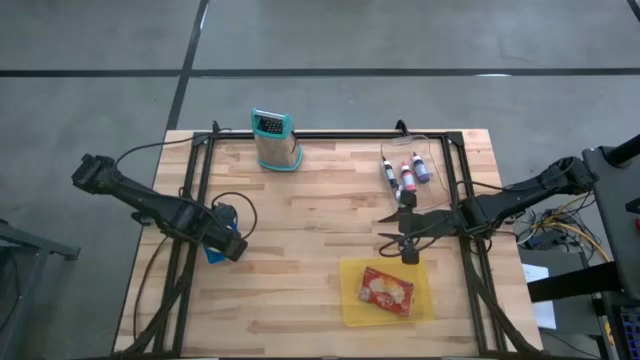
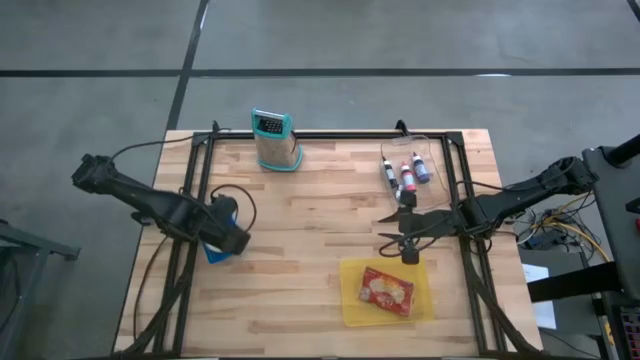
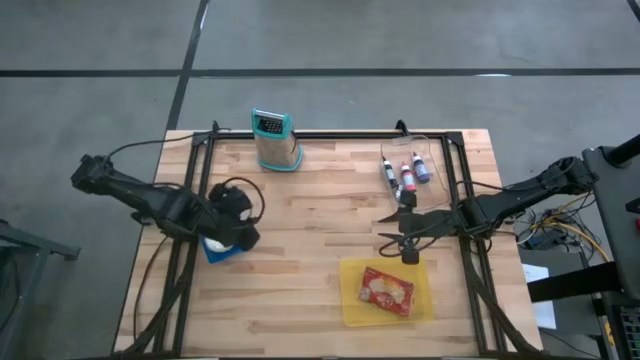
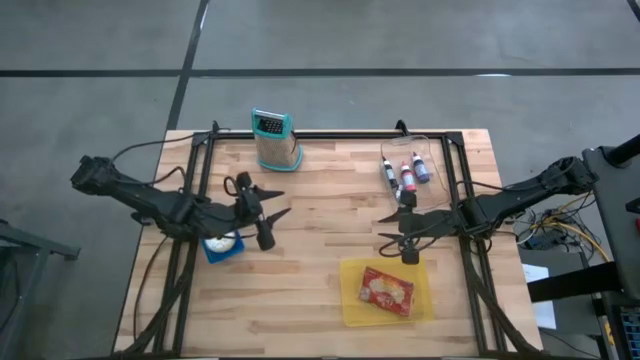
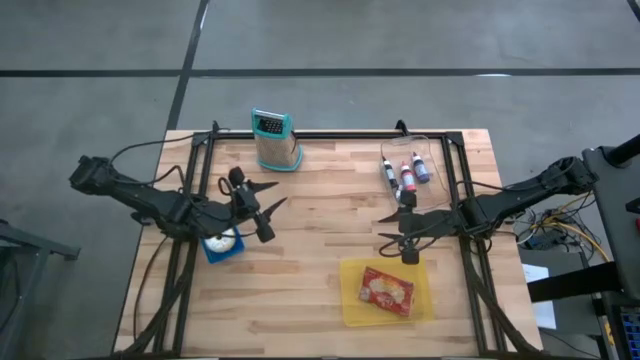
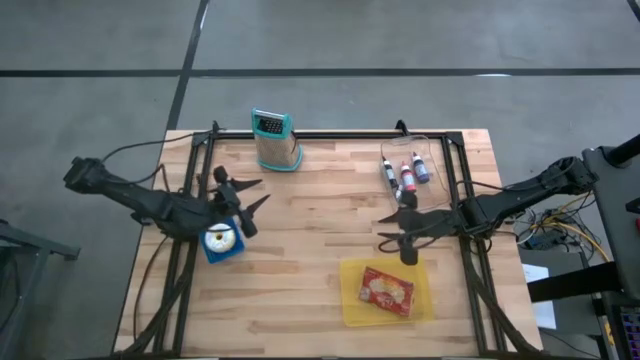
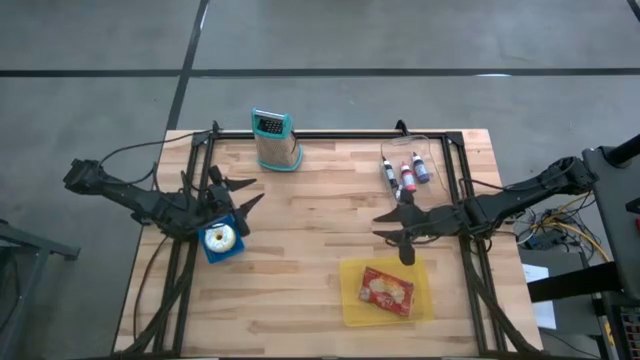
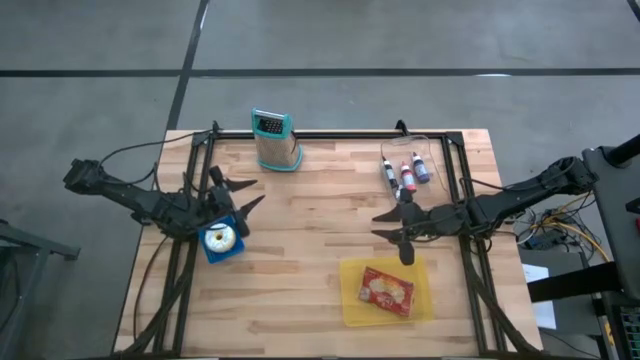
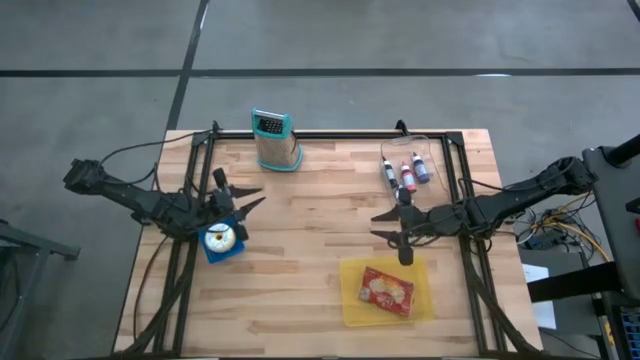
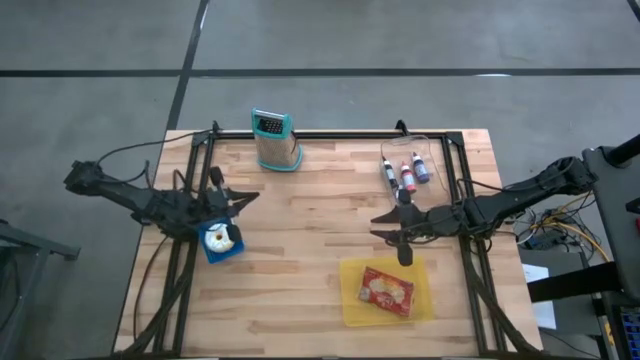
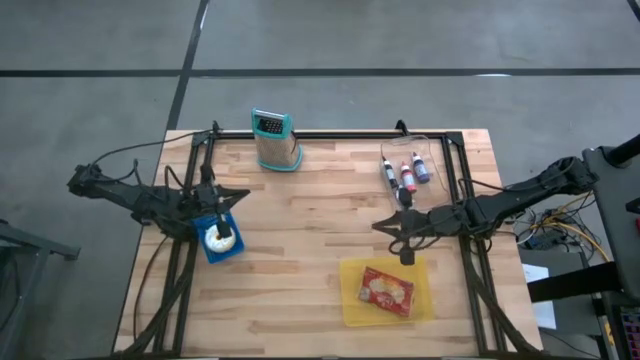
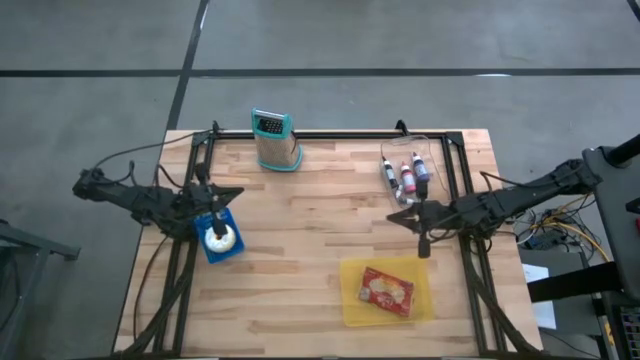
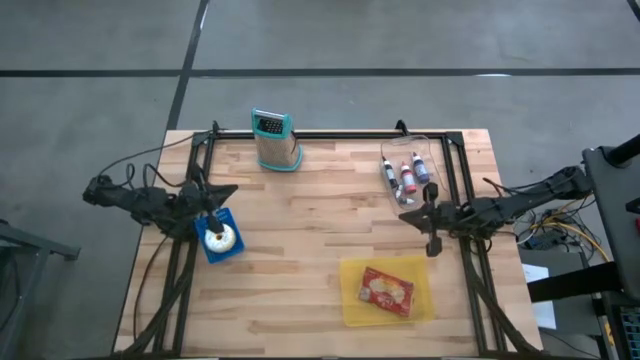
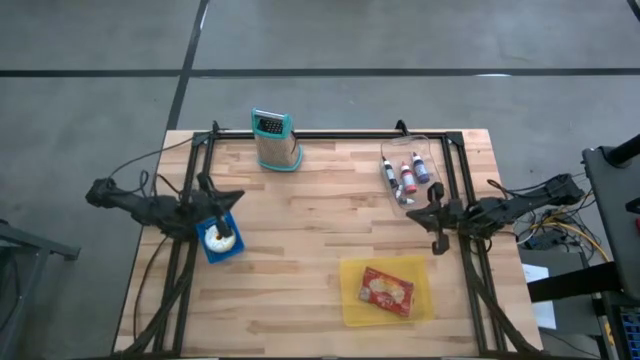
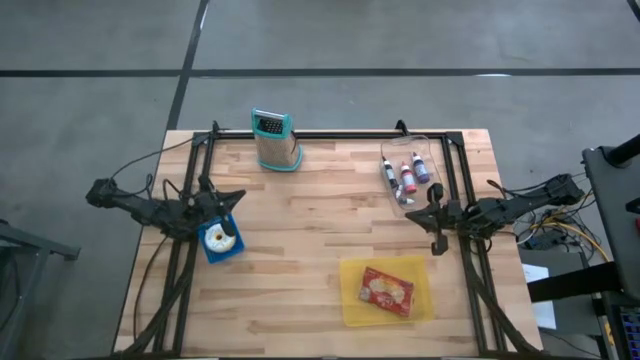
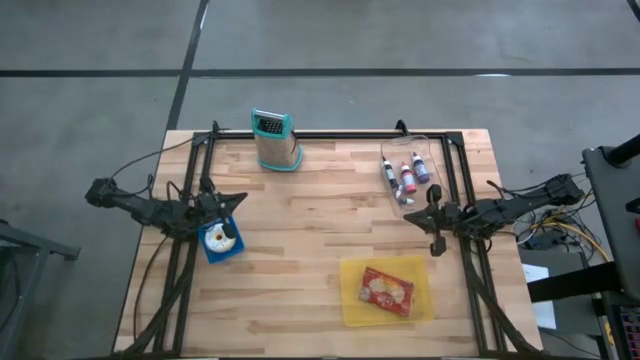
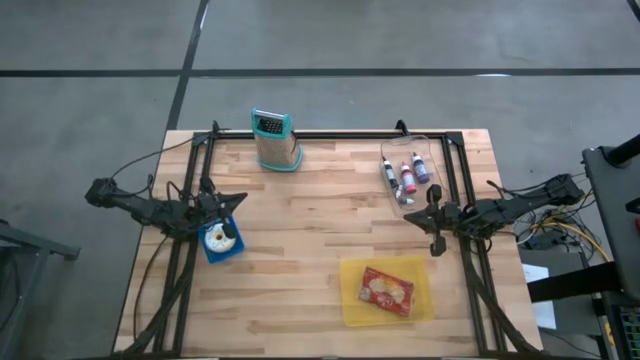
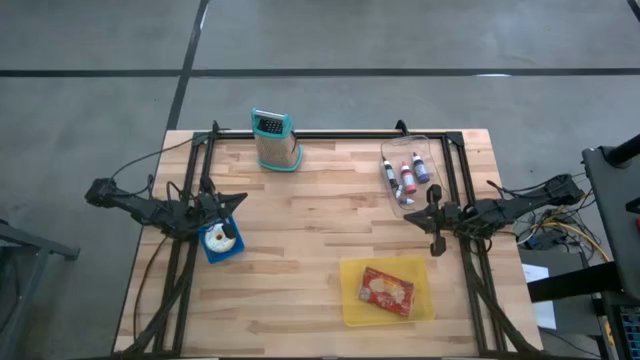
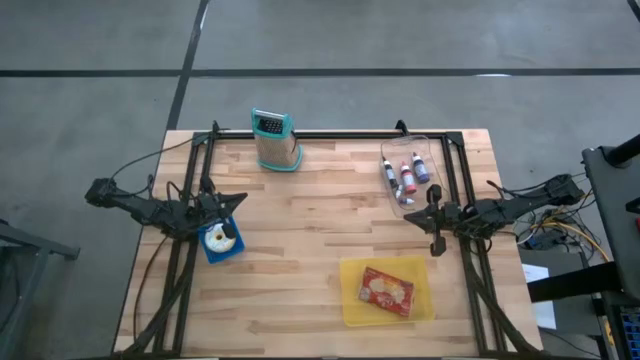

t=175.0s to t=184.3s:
Task: Pick & Place Food Item
Return to Home Position

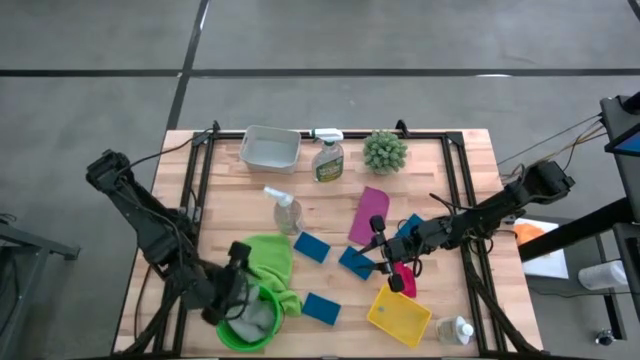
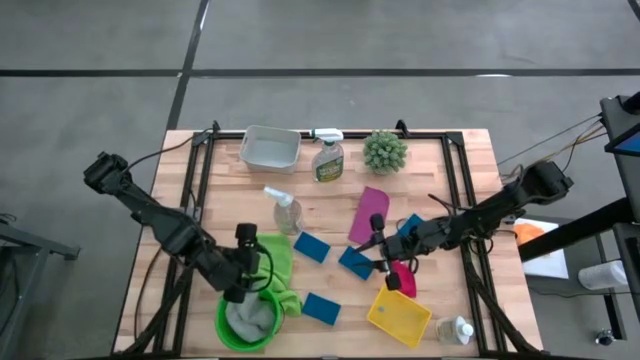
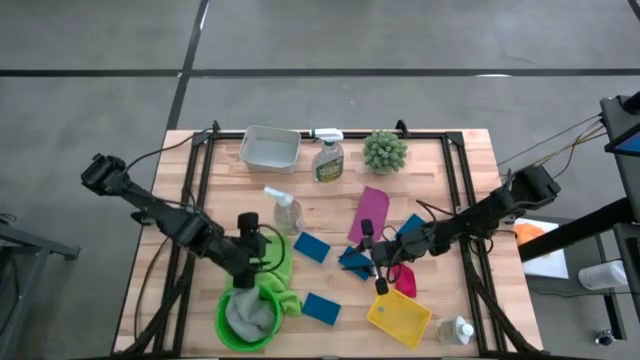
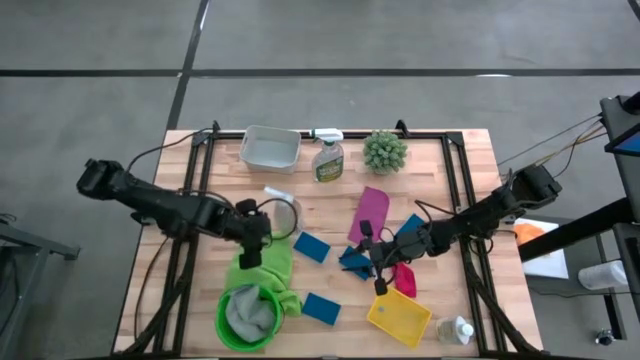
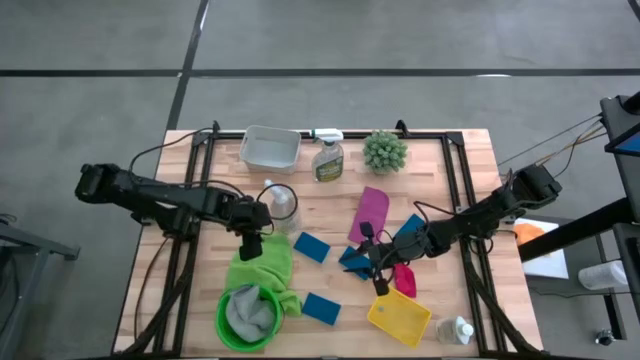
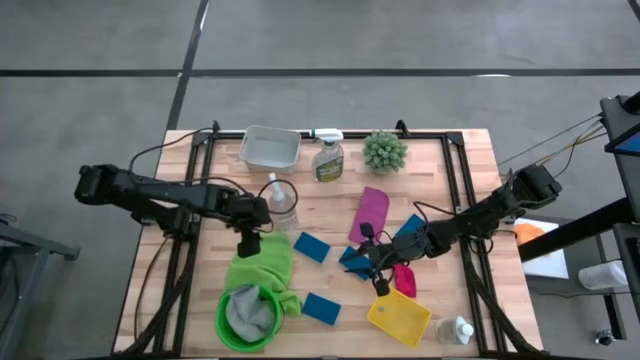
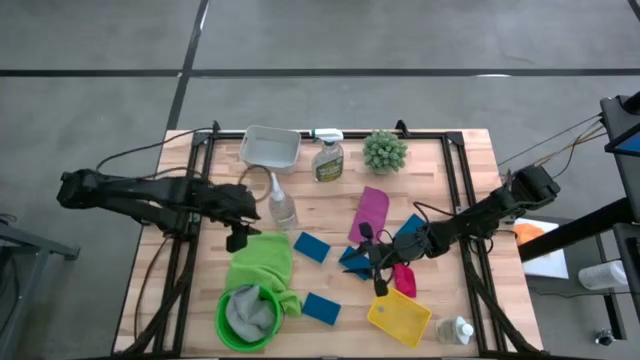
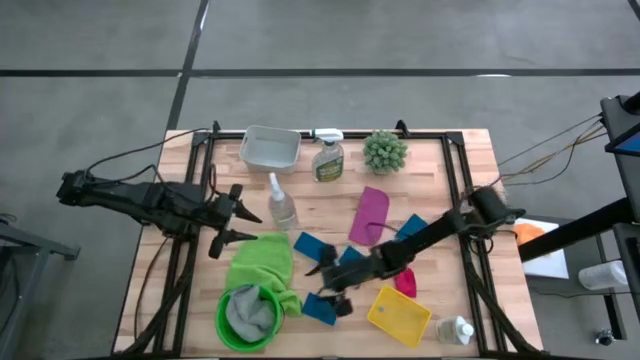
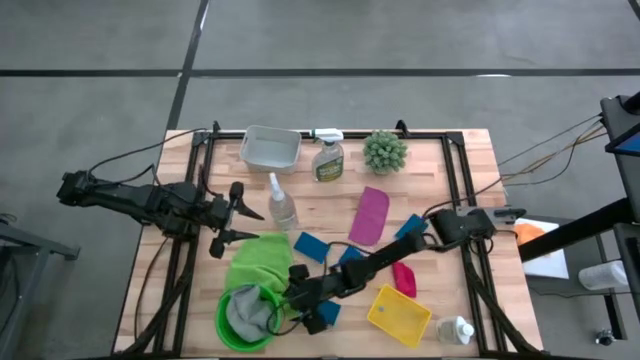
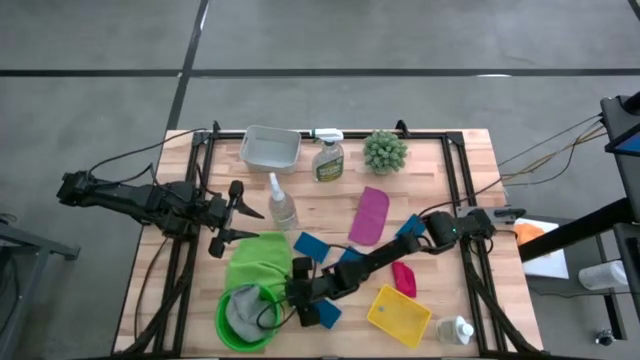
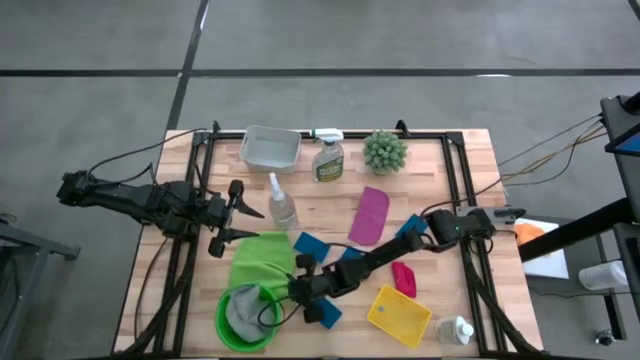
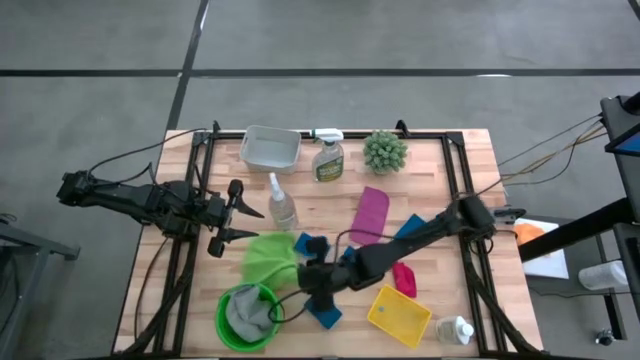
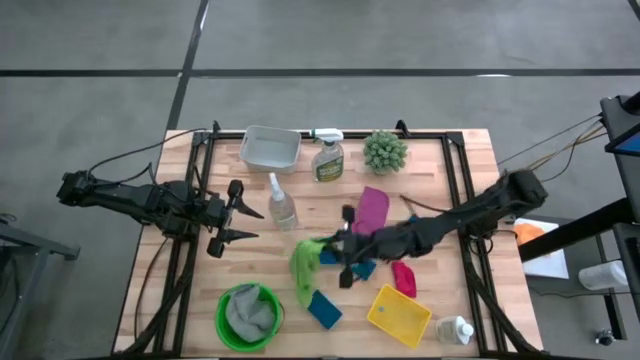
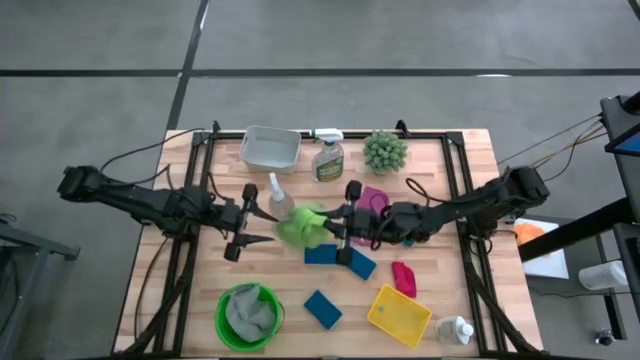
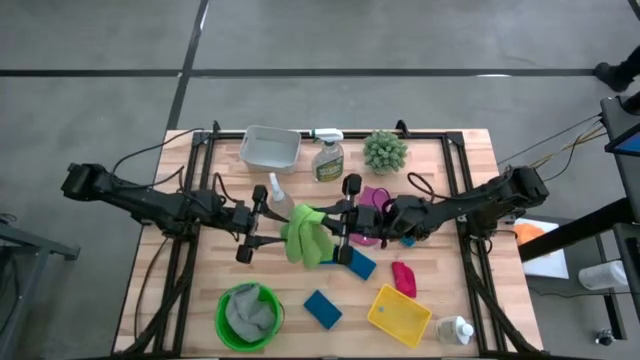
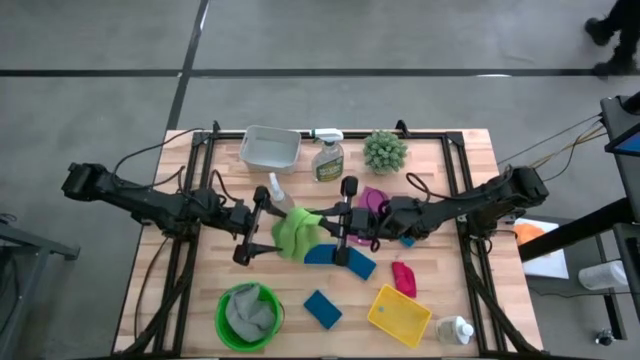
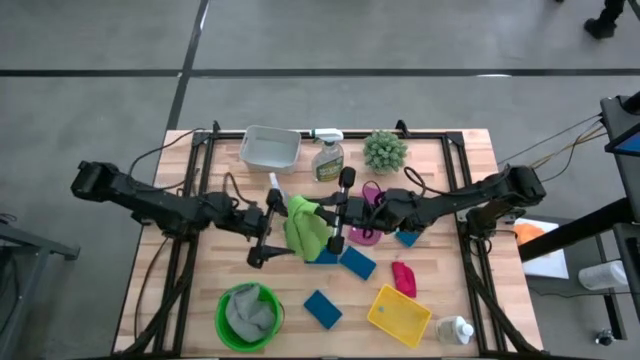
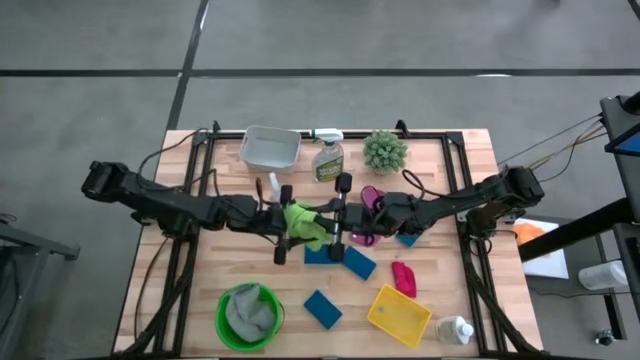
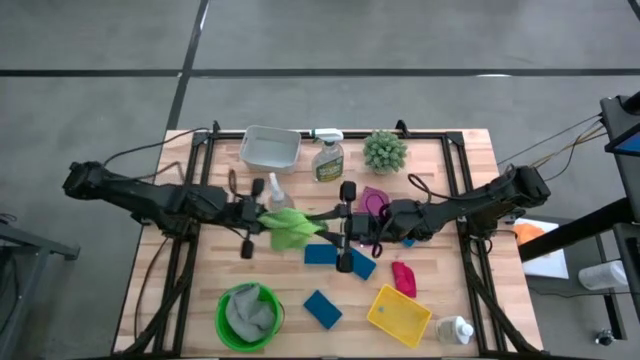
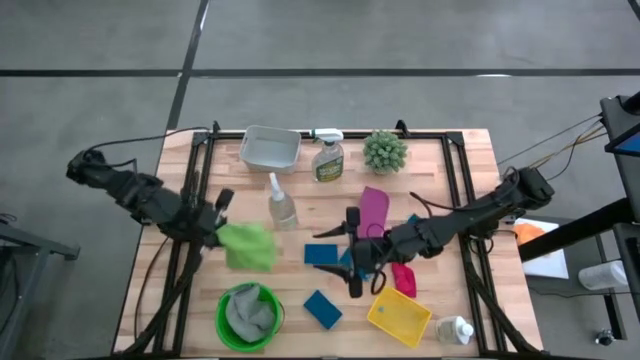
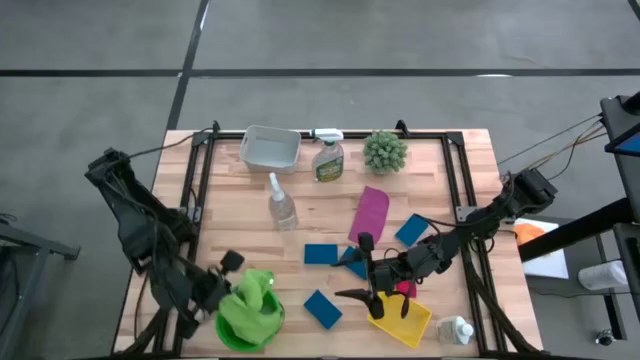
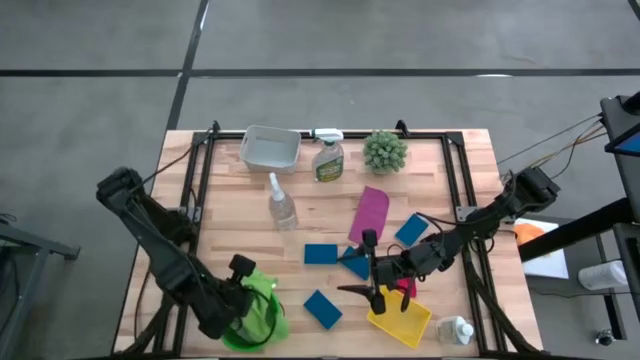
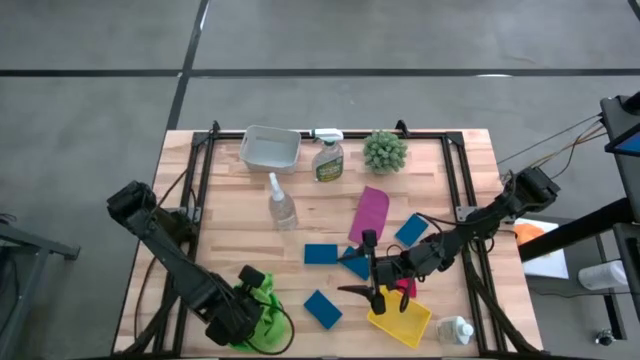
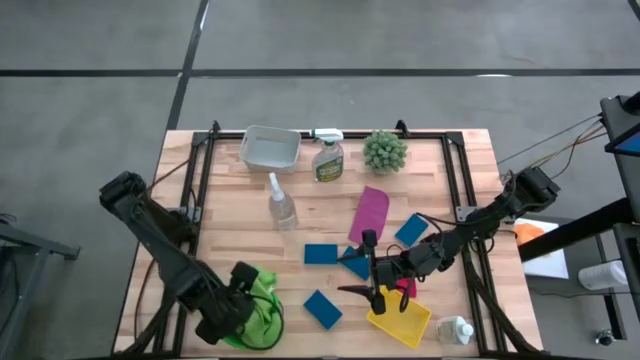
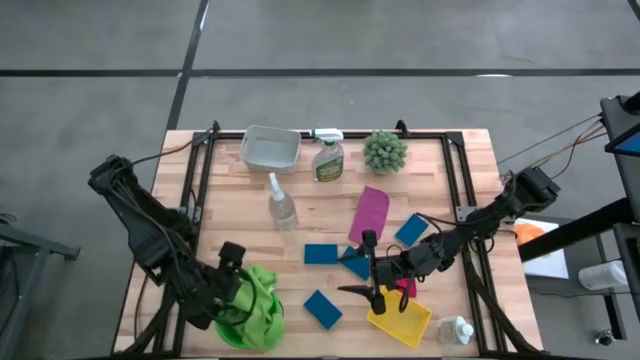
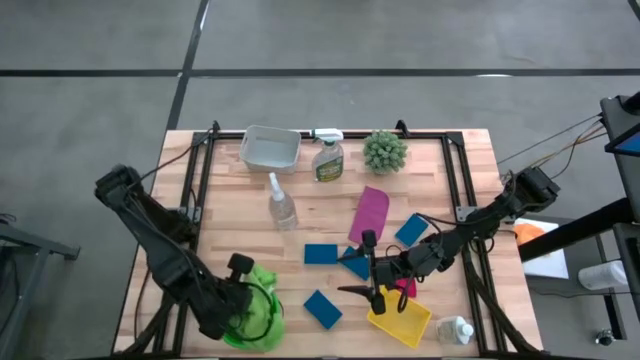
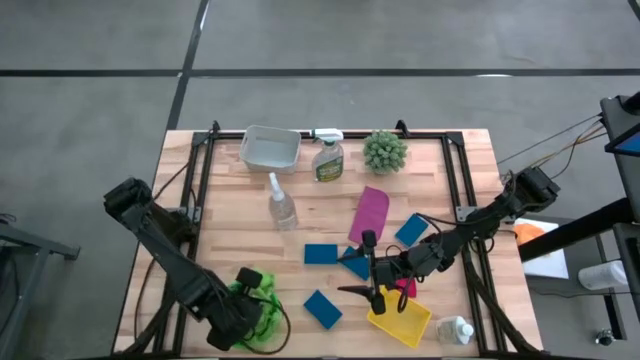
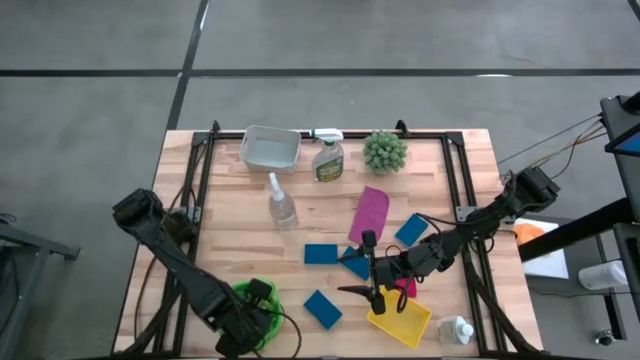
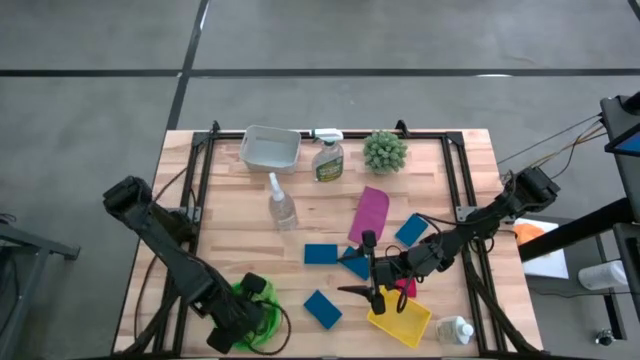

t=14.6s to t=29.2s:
Task: Pick & Place Kitchen Items
Put the green microfiber cloth into the green basket
